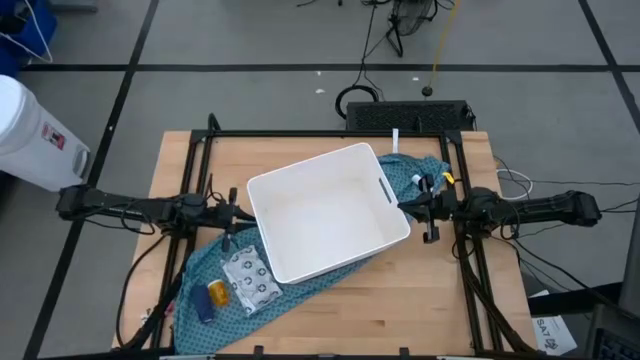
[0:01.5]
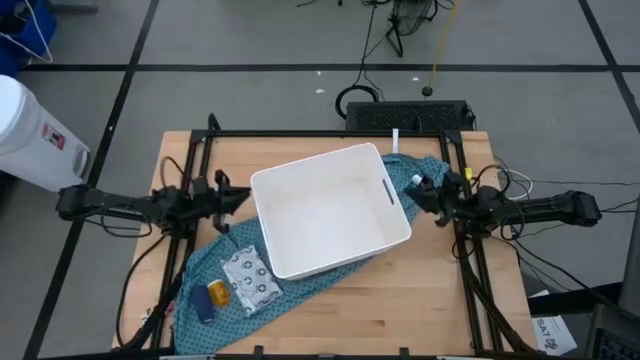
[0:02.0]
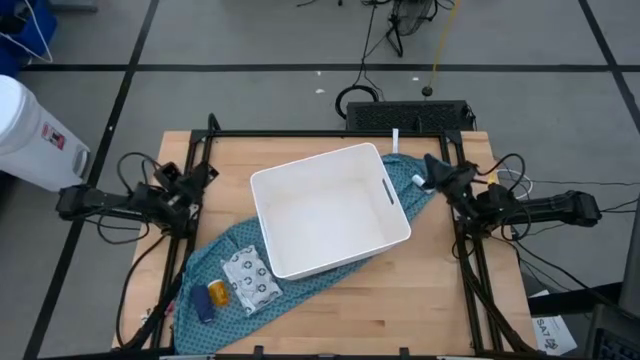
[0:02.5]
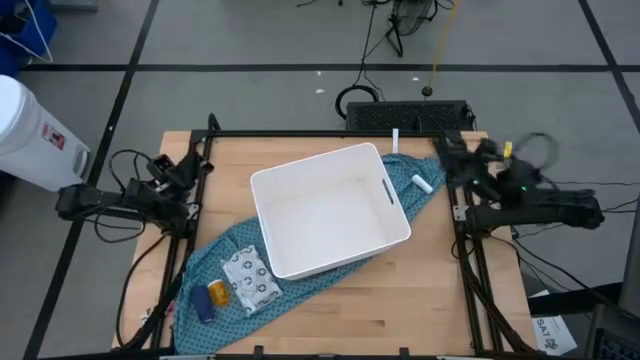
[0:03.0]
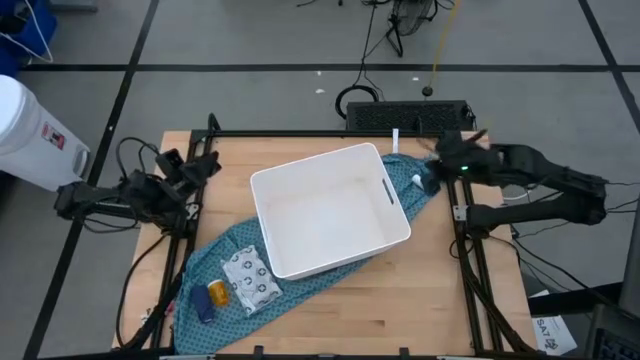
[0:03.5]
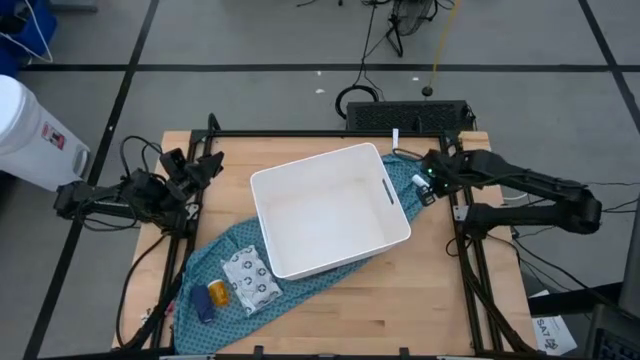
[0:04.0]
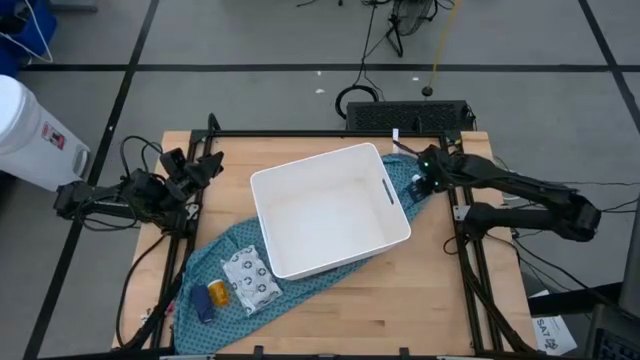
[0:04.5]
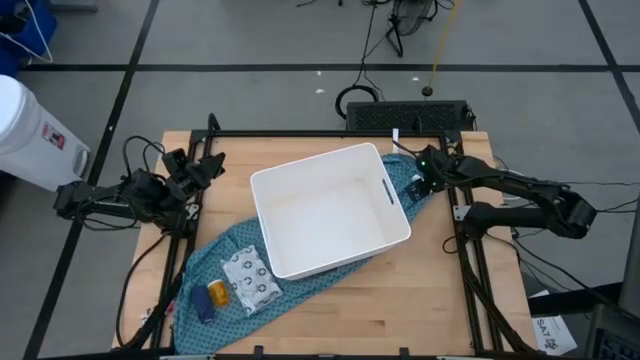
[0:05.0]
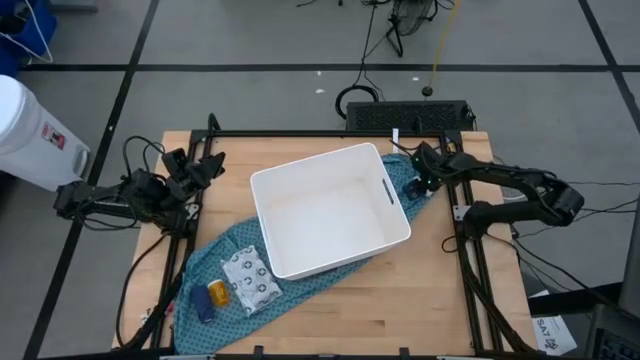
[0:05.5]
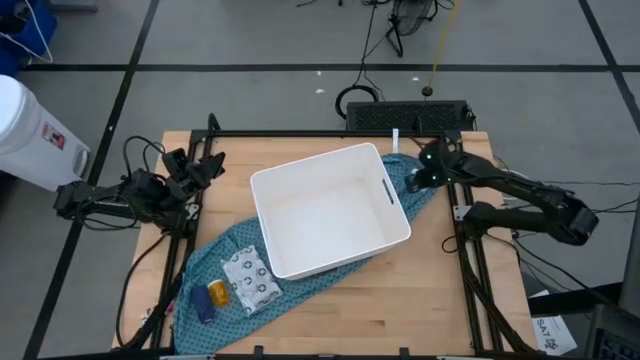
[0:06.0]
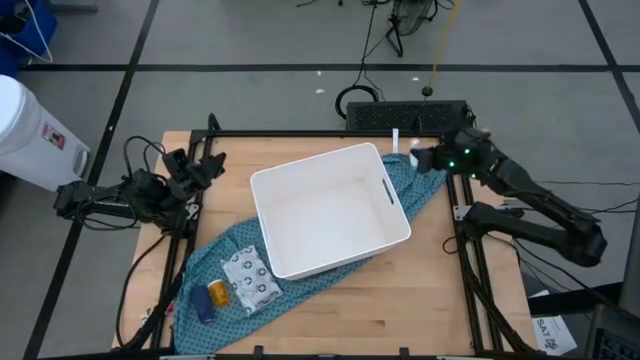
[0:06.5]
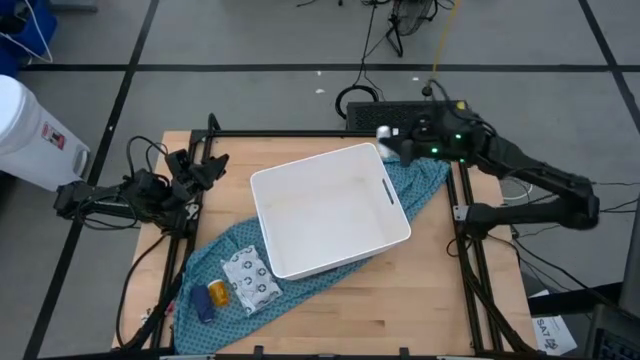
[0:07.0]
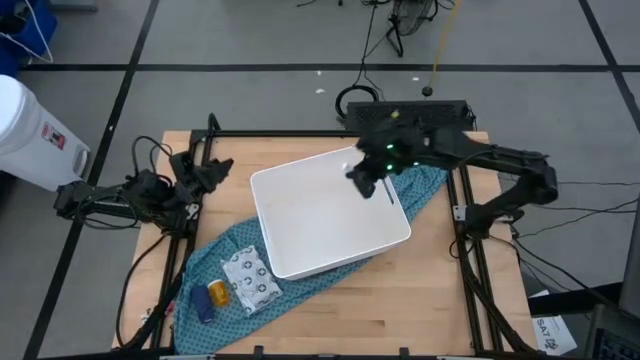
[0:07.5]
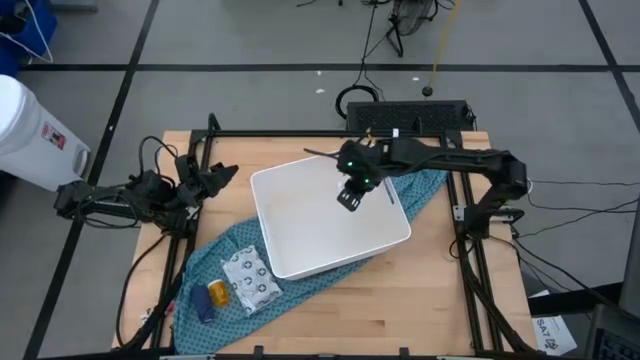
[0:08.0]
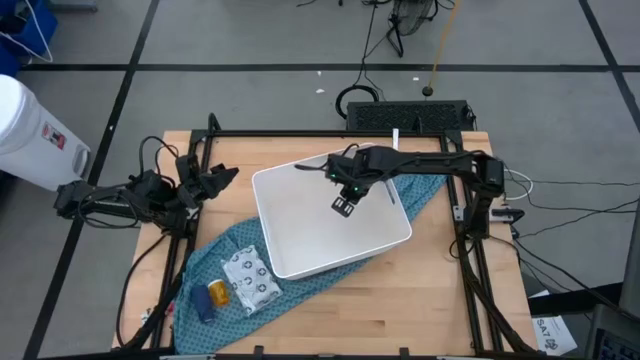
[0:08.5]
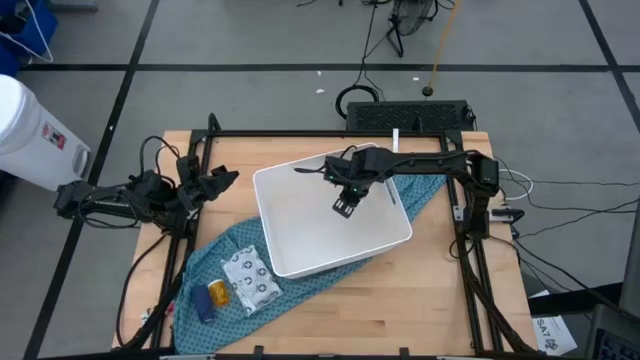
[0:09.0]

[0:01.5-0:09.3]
Task: Pick & place medical supplies in basket/bin
Put the white gauze into the white bin

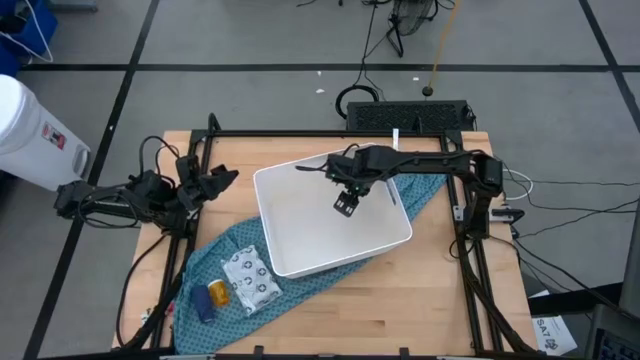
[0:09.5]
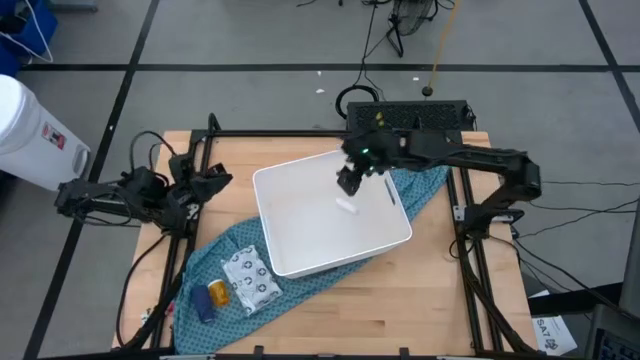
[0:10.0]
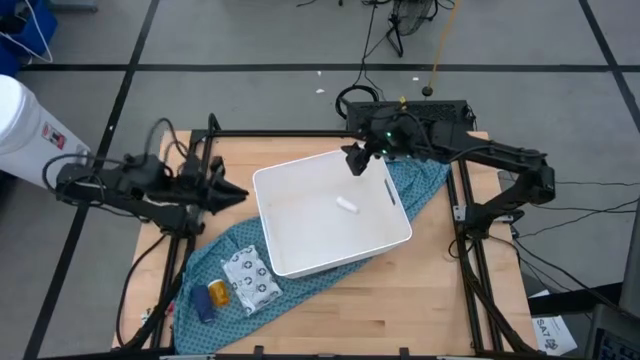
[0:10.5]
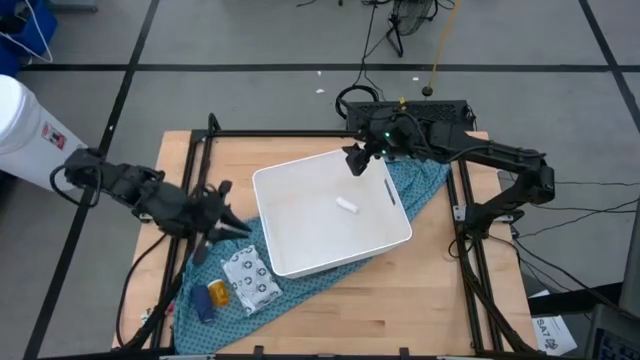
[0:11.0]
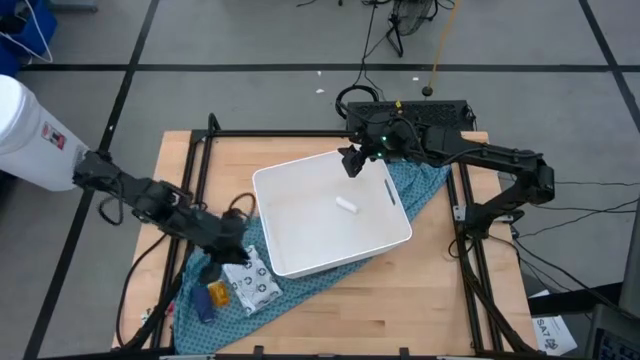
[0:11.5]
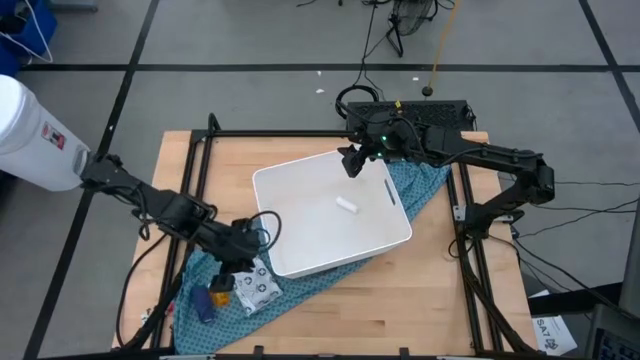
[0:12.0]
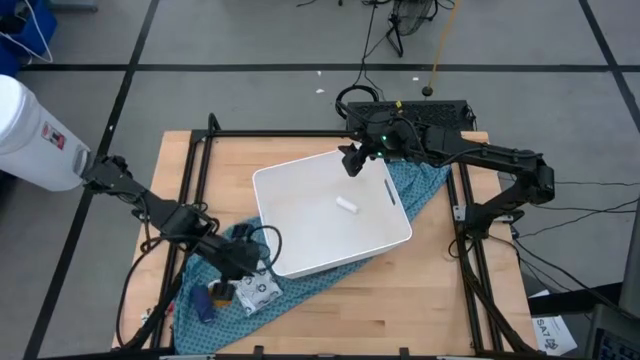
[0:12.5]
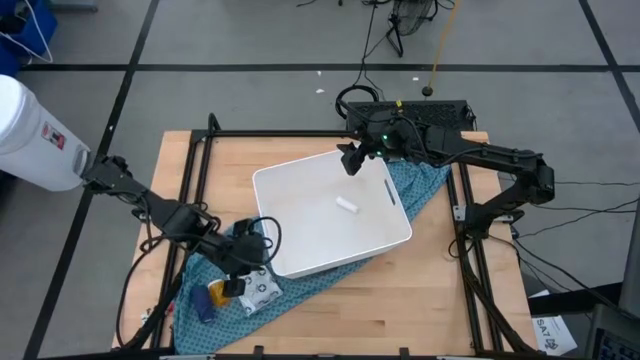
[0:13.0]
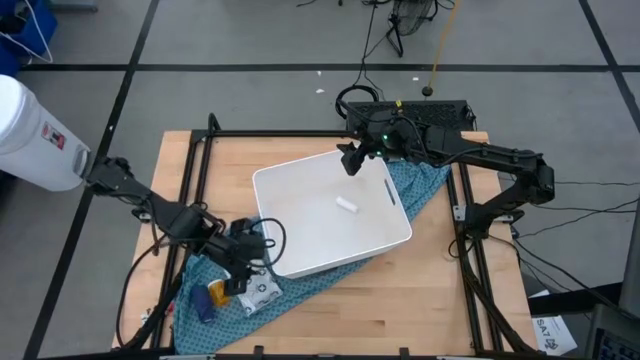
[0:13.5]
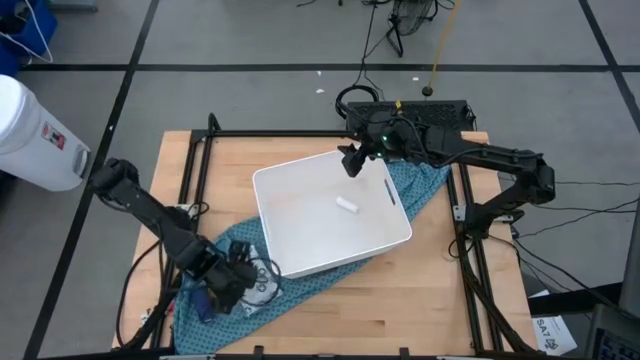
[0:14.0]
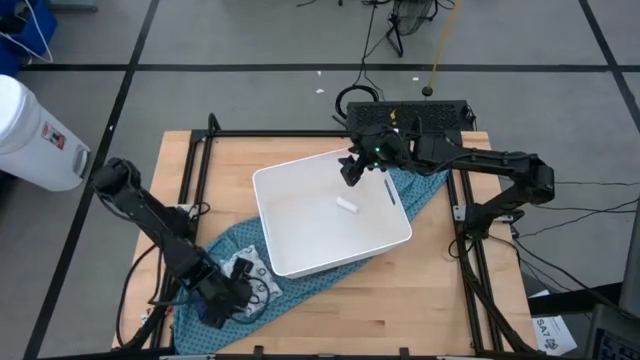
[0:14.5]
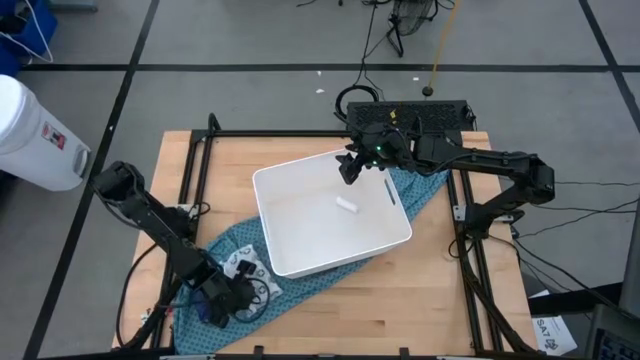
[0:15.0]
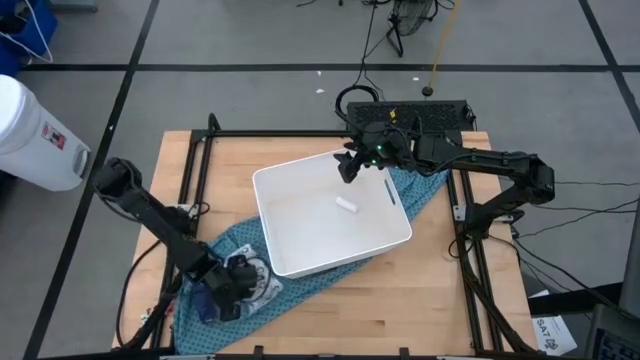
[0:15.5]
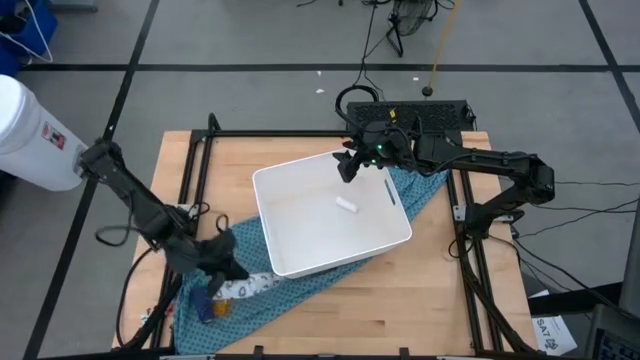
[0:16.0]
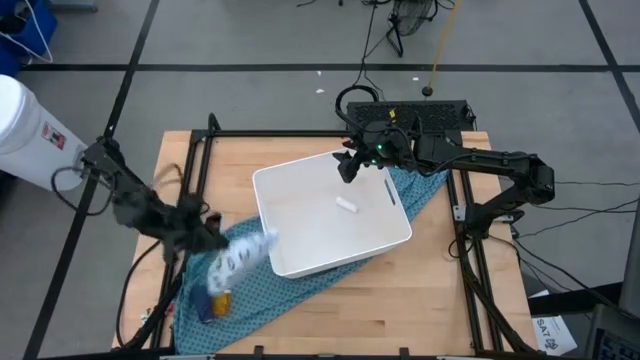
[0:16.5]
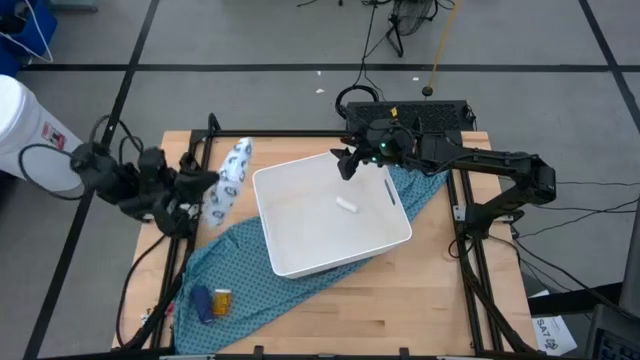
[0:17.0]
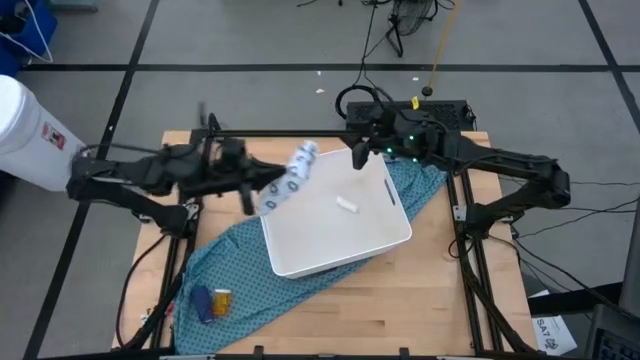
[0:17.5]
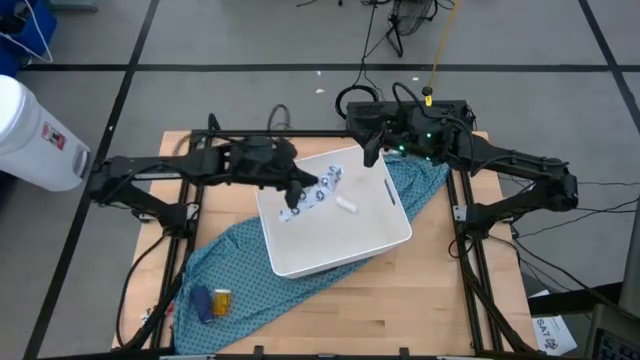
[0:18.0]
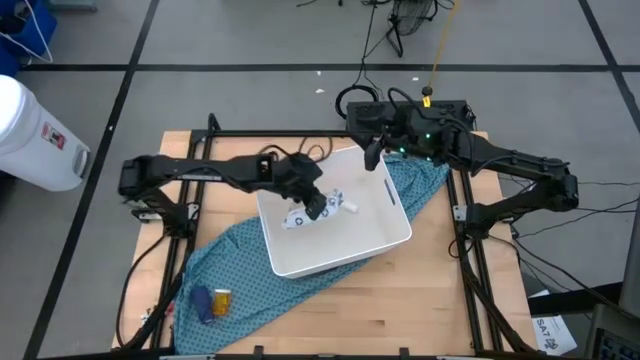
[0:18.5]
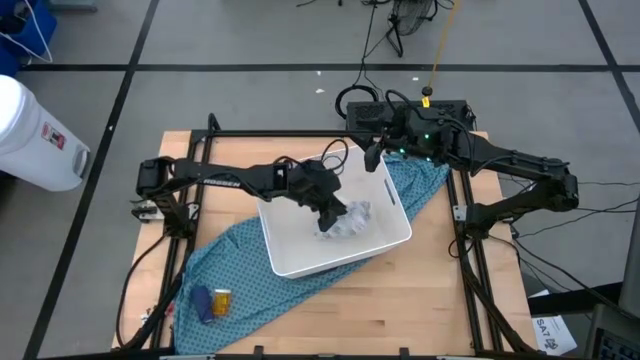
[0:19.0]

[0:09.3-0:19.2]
Put the white mailer bag into the white bin

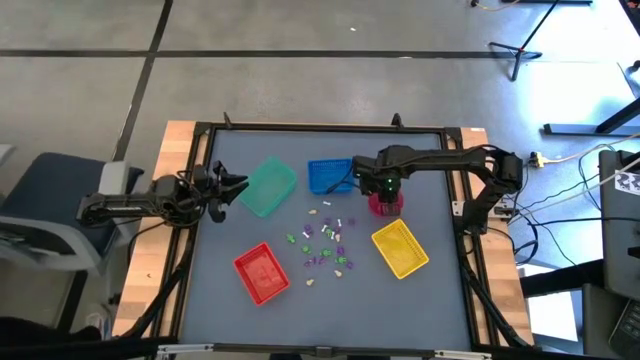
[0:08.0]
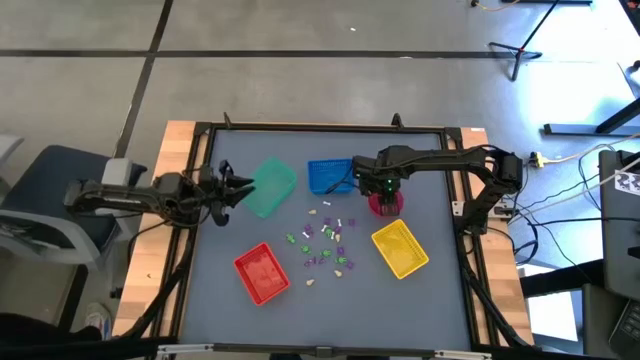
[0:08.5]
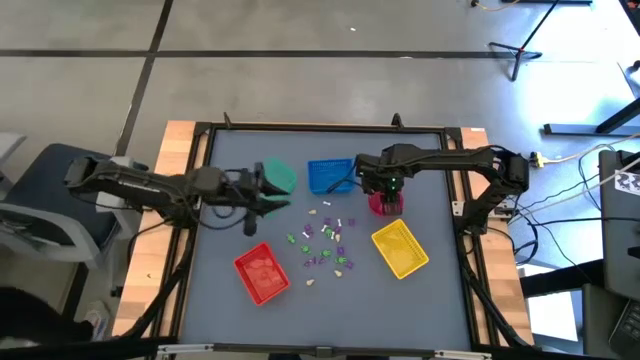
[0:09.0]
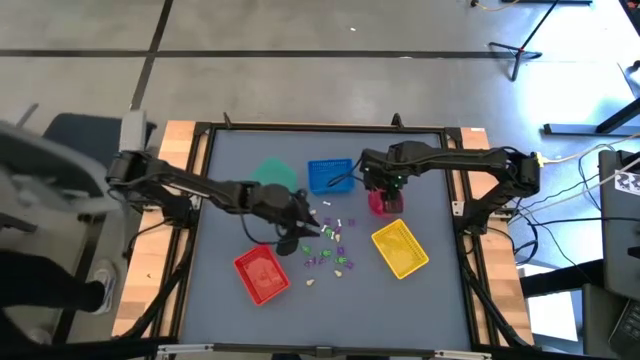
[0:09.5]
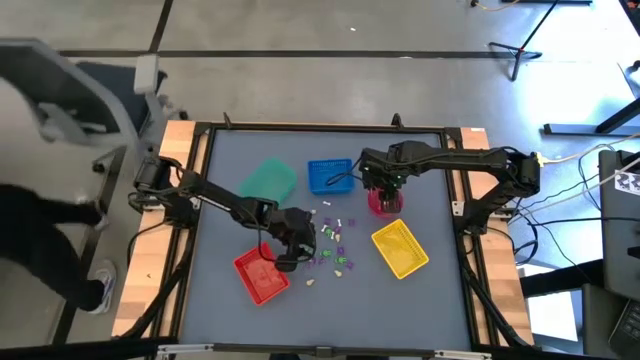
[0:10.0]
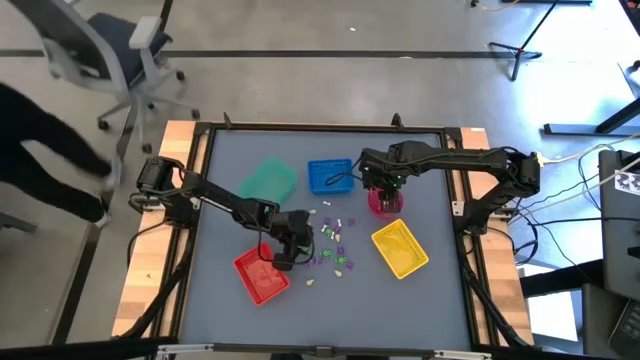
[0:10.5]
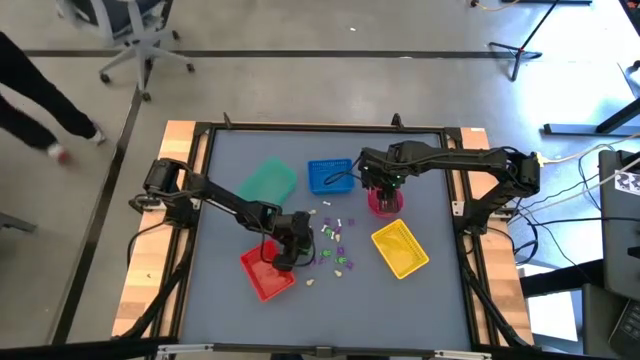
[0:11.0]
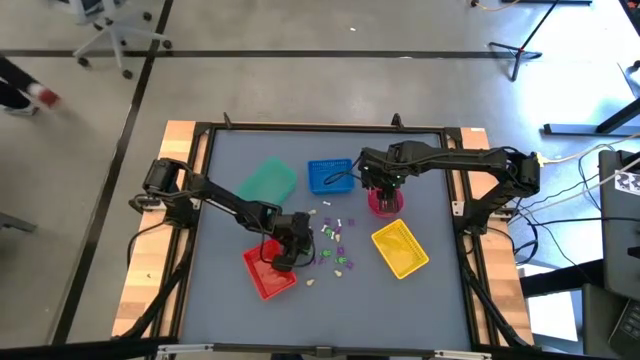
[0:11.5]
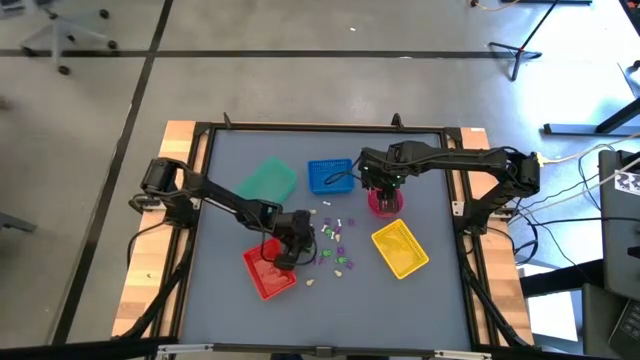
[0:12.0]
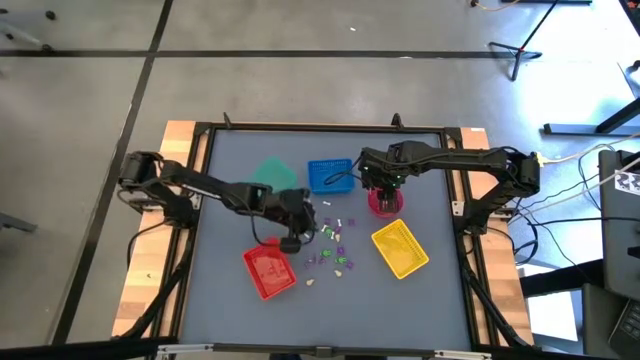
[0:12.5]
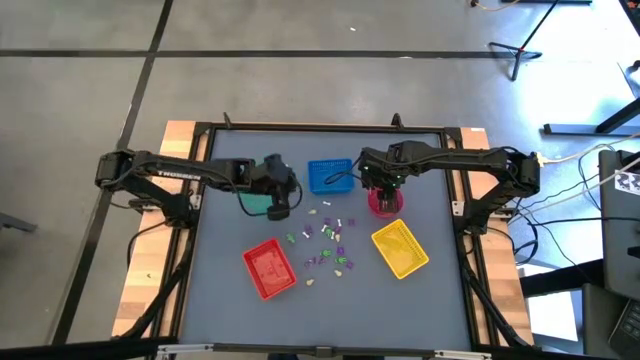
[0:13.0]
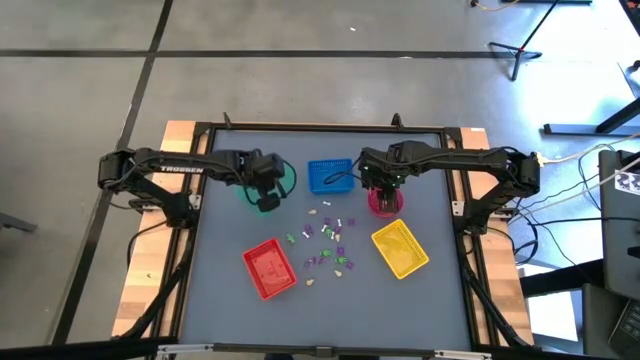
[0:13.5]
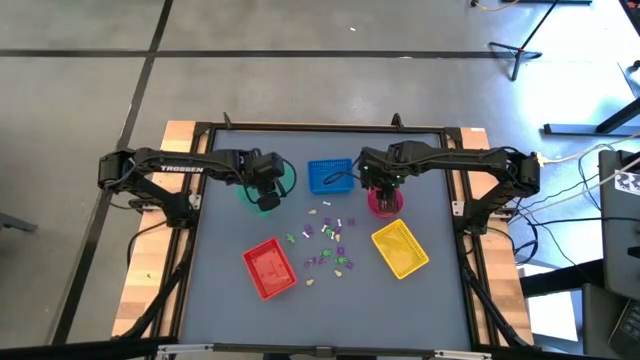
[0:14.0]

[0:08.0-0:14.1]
Task: Sort Halloween decoration
Put the green skeleton toy into the green bin
